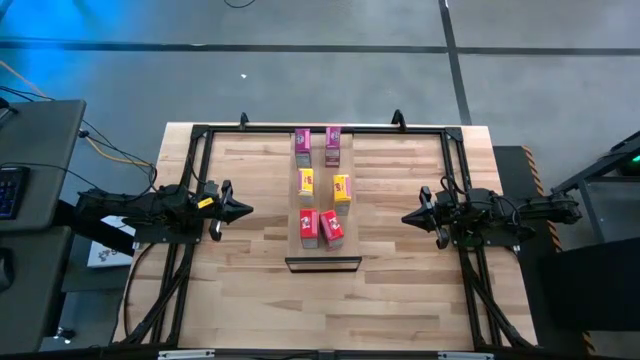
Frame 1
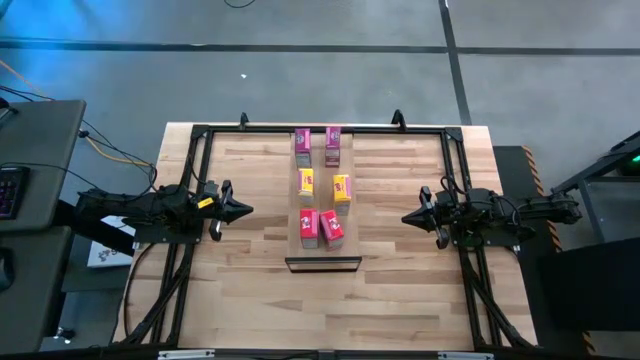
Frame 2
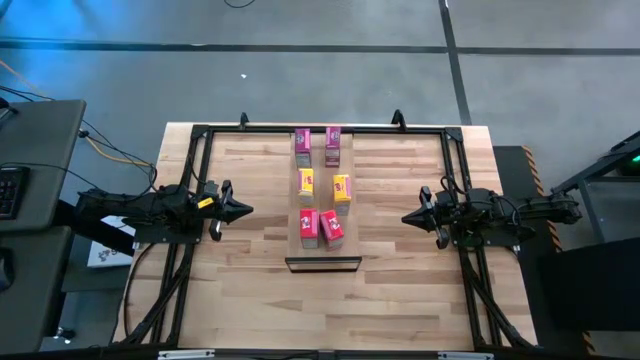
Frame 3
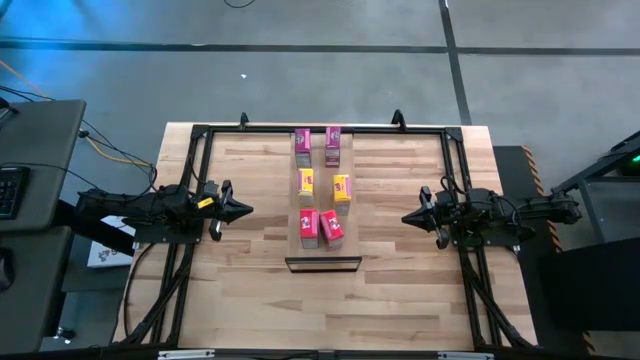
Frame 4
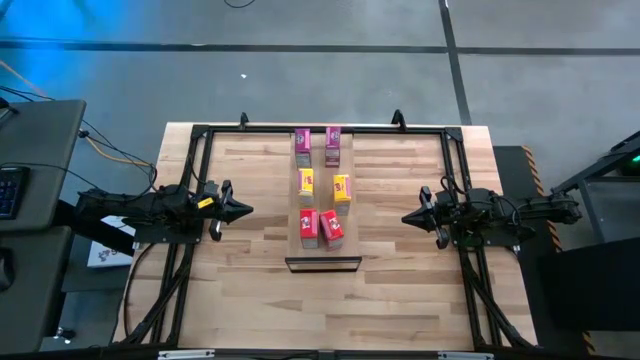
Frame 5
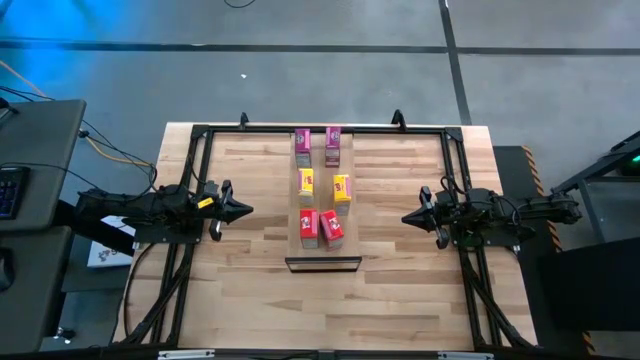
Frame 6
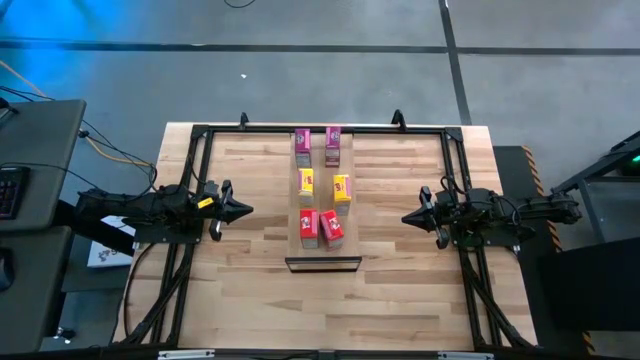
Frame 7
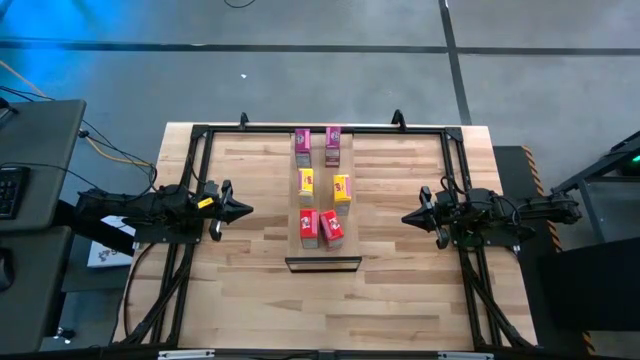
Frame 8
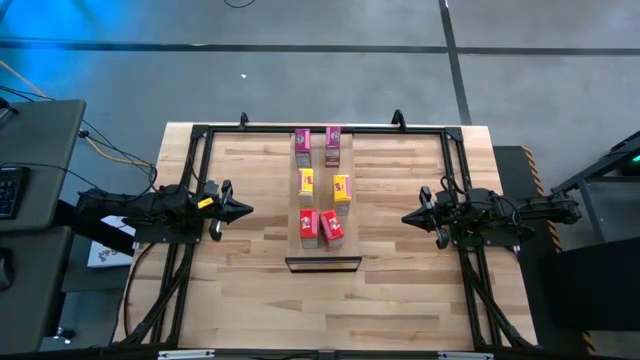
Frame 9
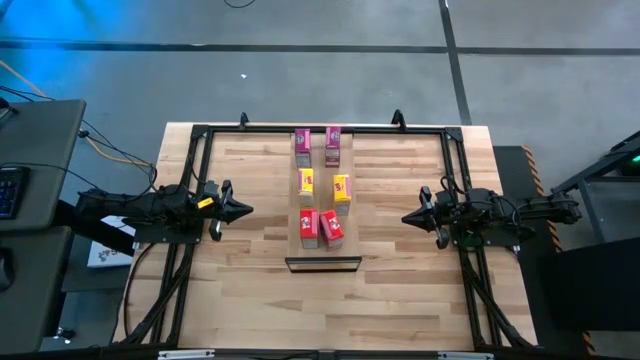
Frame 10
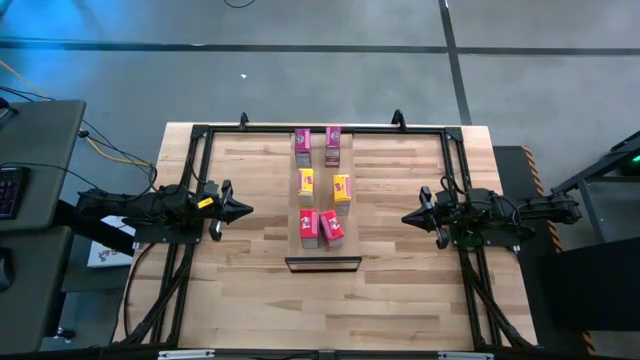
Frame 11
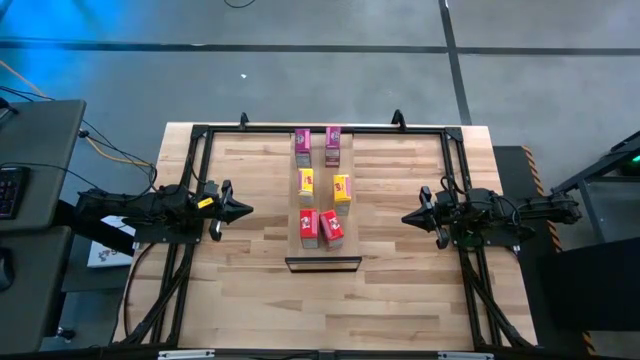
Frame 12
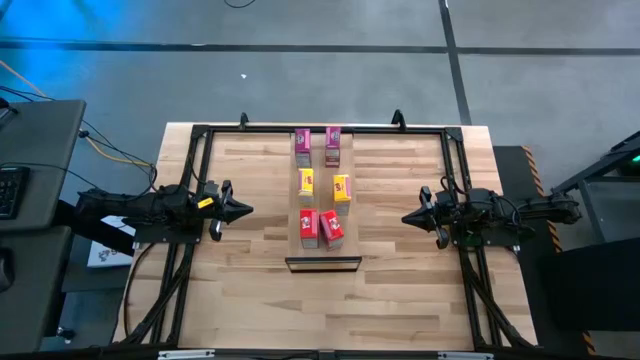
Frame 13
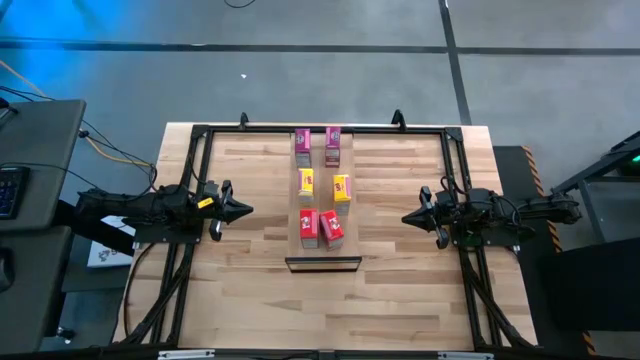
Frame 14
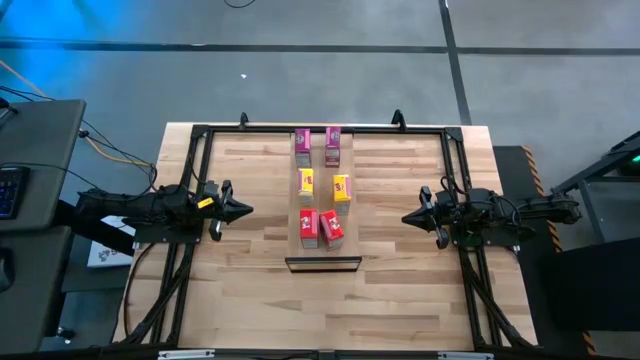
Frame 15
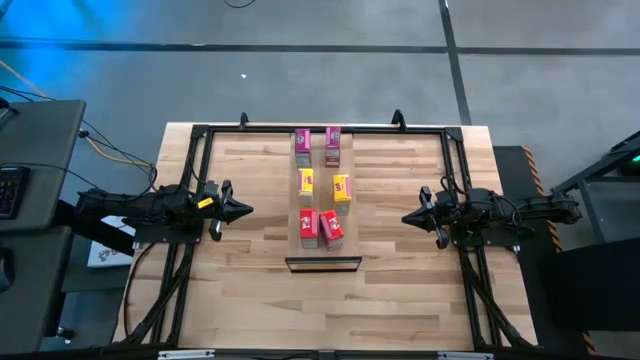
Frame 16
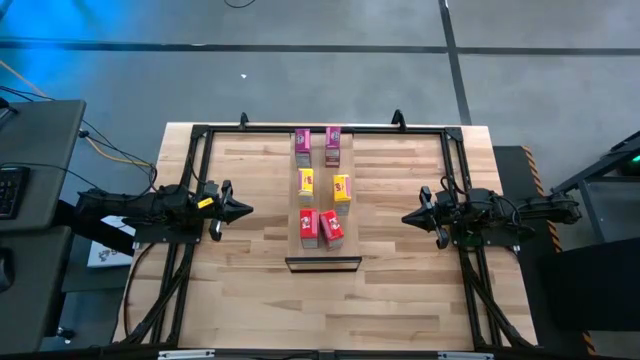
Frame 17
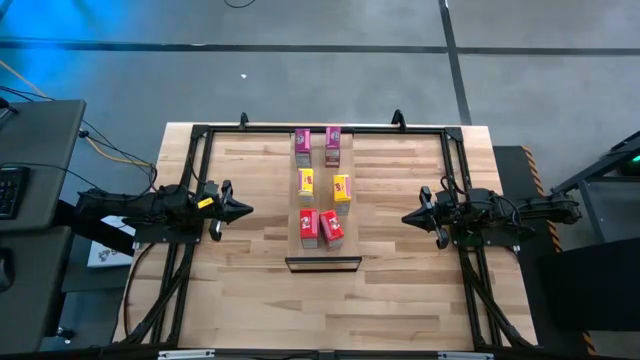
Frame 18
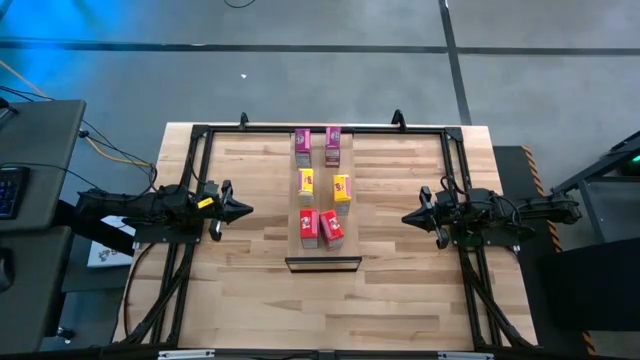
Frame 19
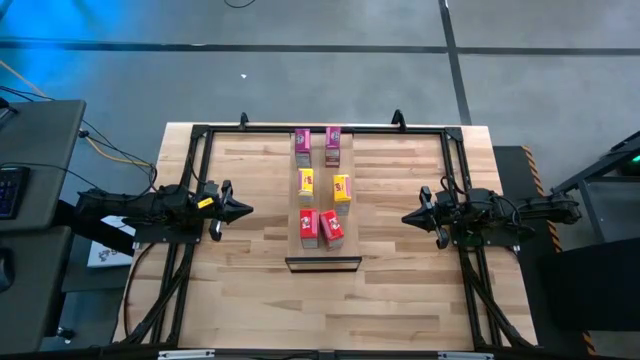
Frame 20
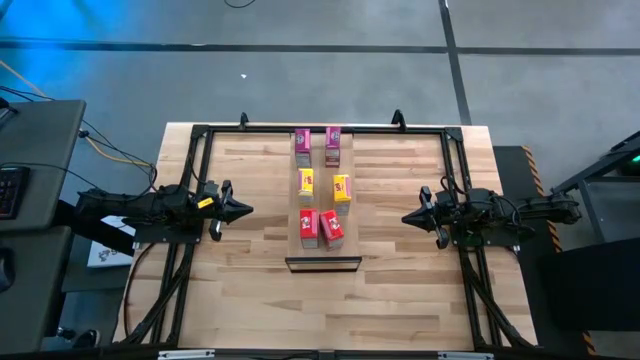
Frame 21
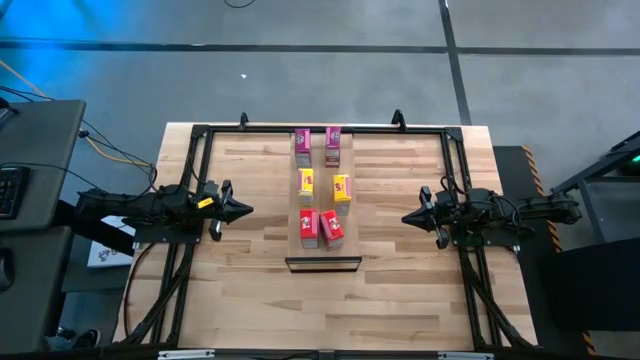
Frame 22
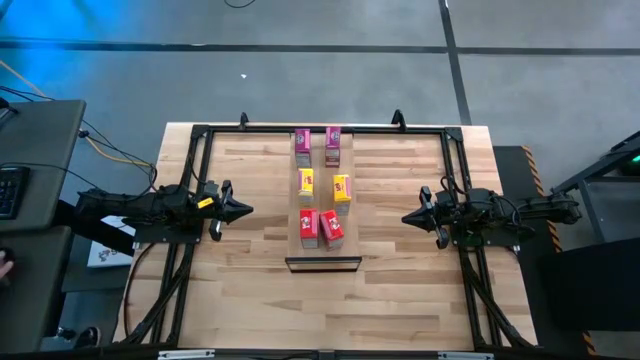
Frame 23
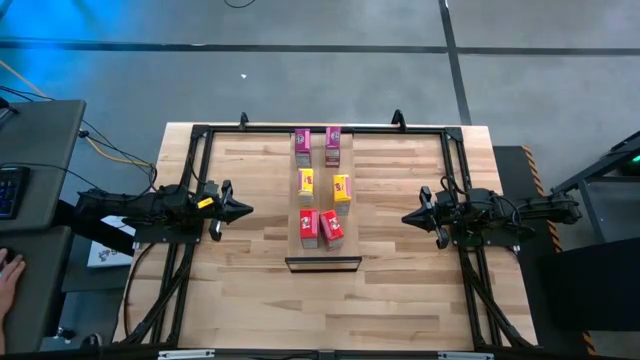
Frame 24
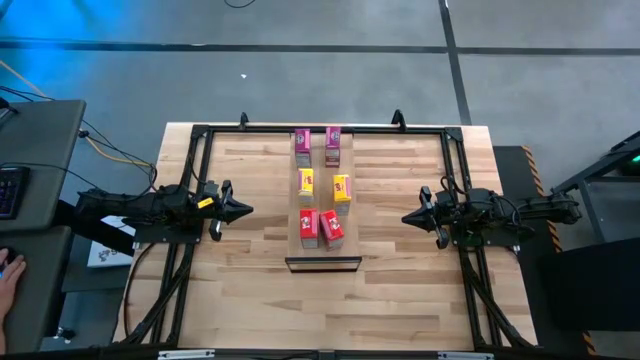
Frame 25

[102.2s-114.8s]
Task: Stack cereal on shelf
Return to Home Position

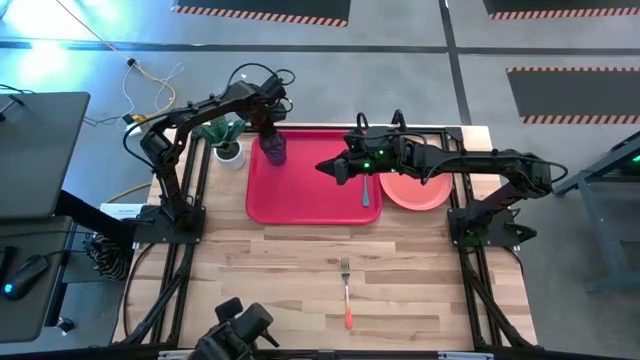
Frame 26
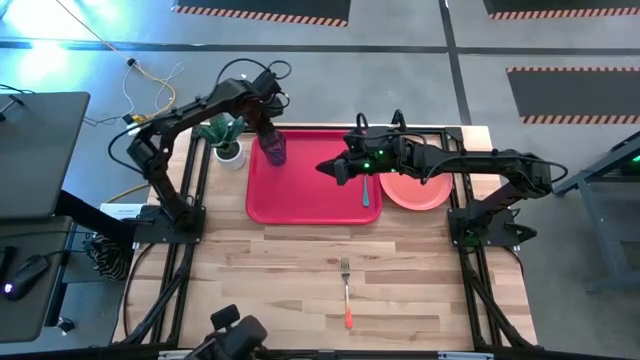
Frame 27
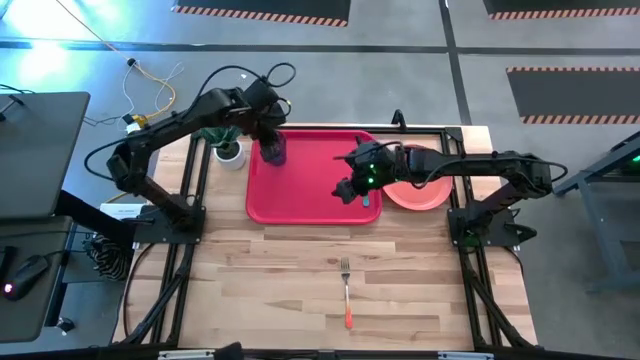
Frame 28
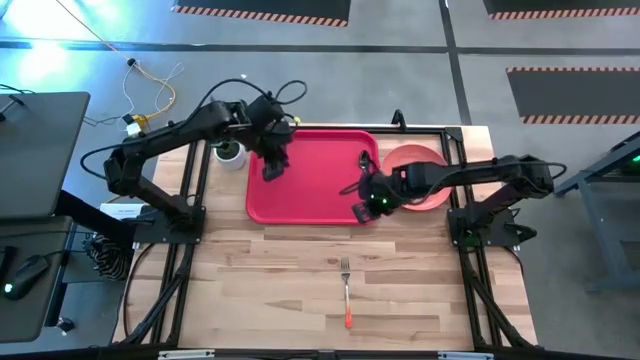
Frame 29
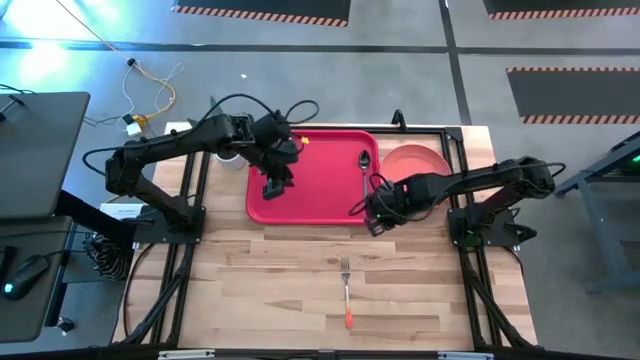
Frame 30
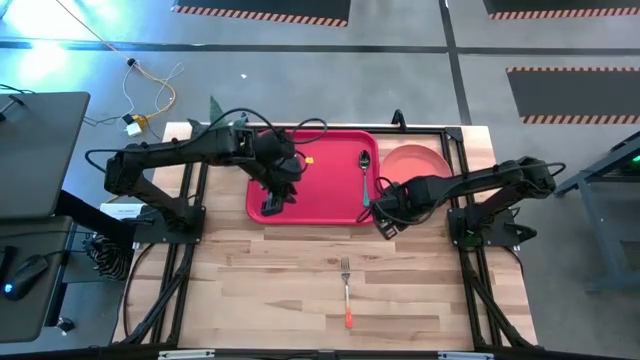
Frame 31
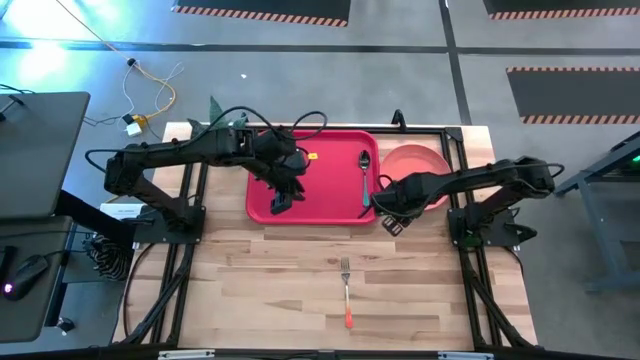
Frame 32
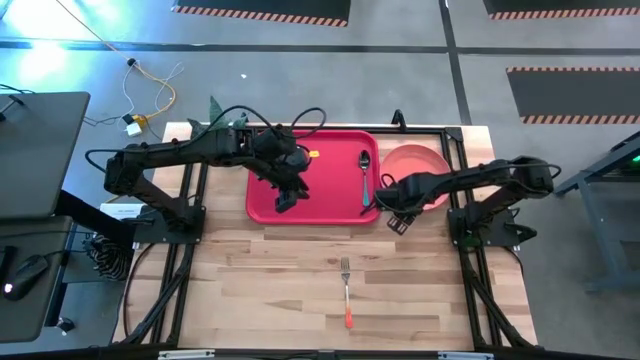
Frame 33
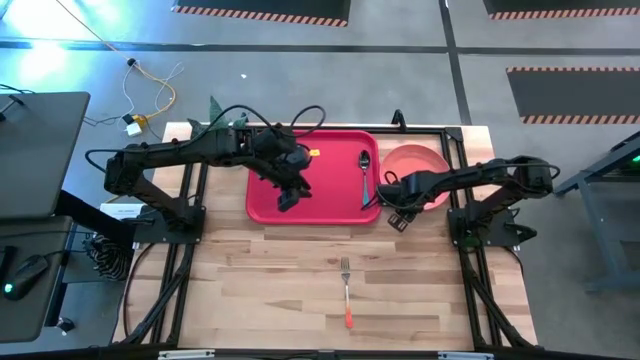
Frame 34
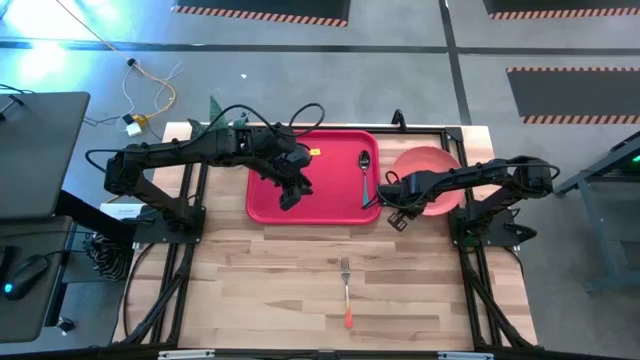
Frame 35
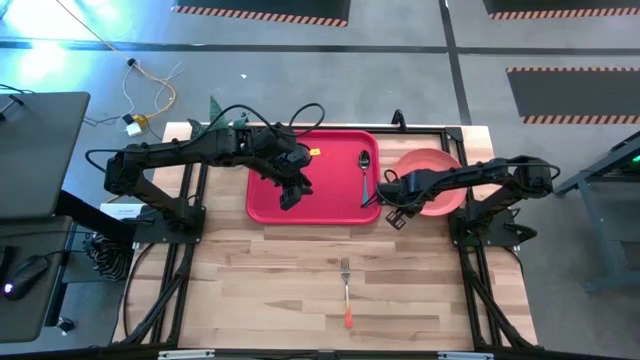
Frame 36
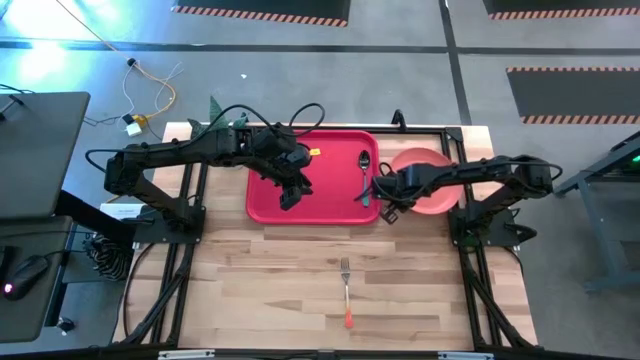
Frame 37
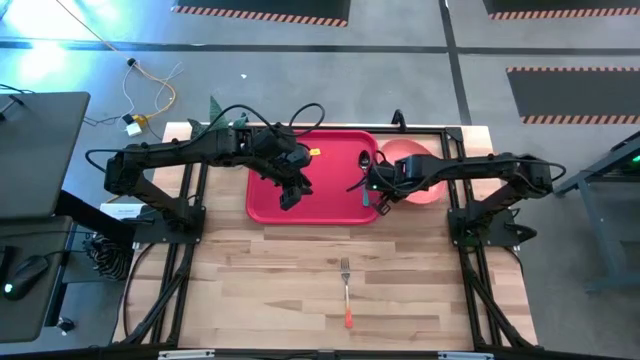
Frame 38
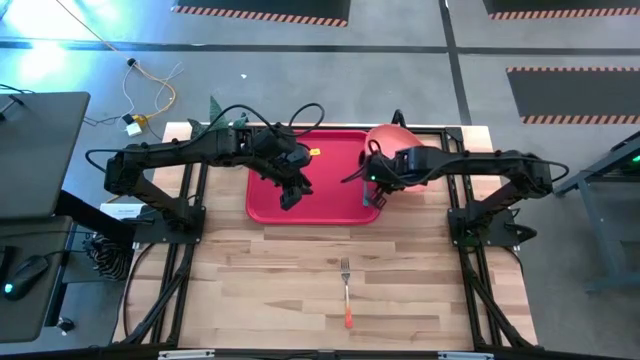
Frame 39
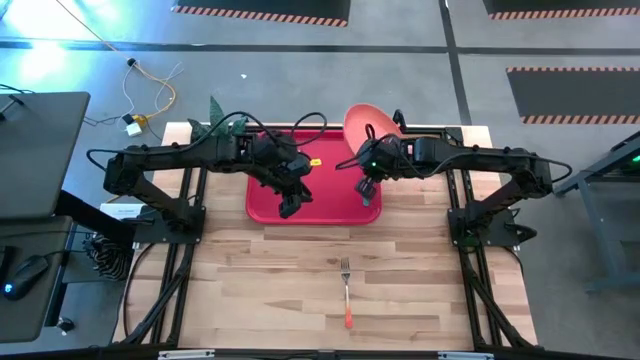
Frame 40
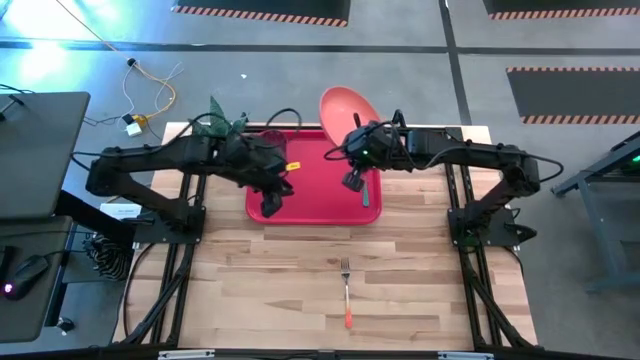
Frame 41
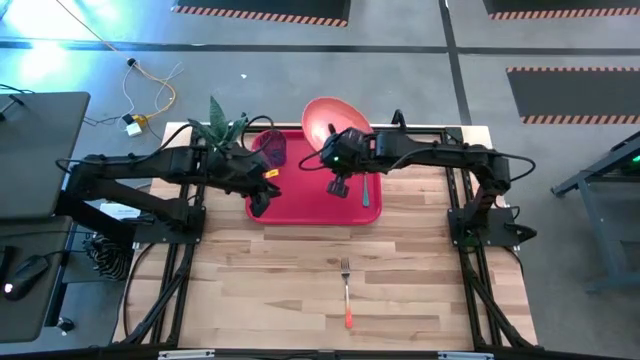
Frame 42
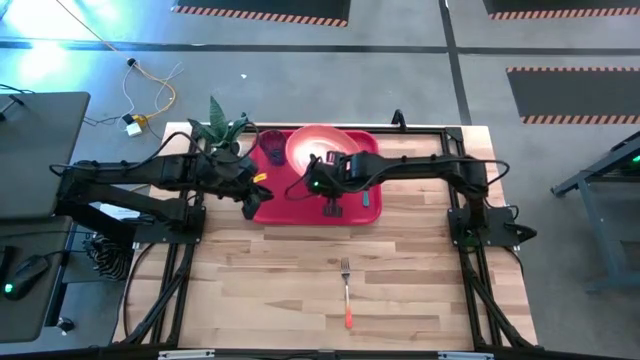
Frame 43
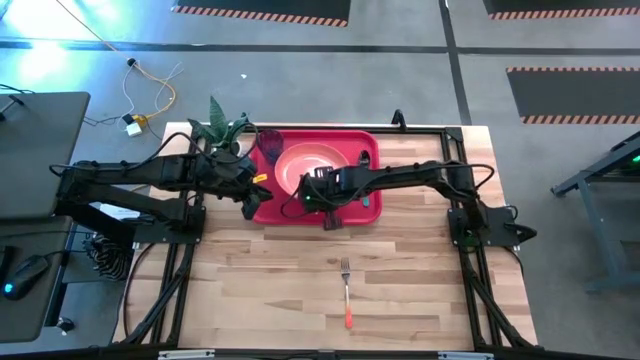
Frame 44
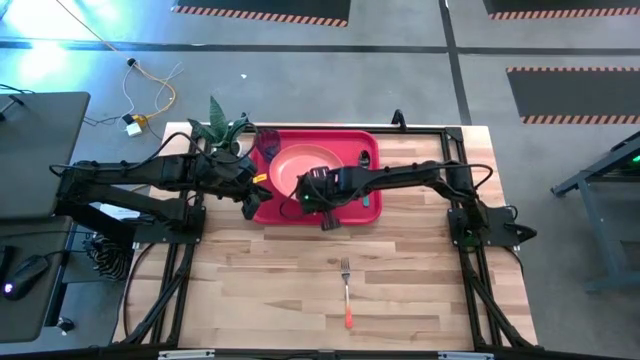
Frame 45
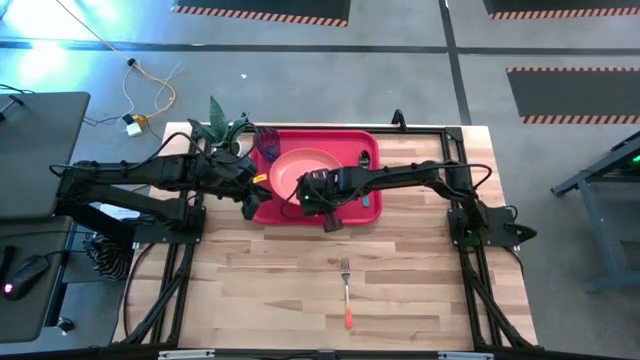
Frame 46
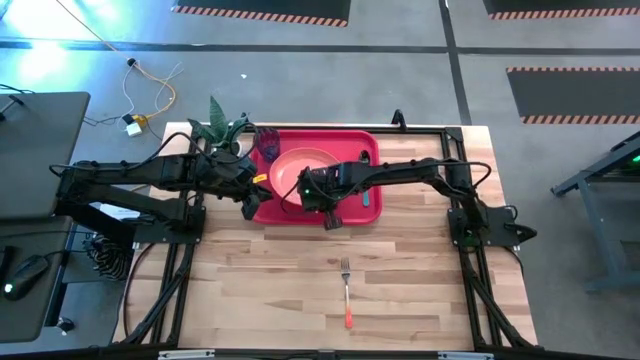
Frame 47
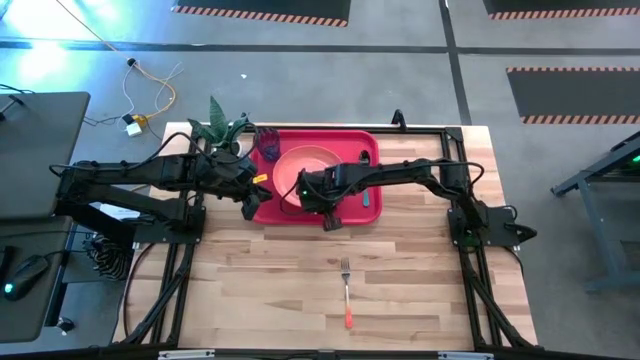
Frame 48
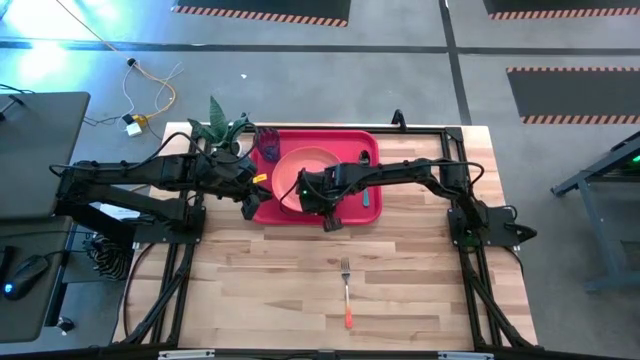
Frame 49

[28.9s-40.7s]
Task: Pick and place plate/cup/fork/spoon on tray
Put the pink plate on the red serving tray to the bottom right of the blue cup
